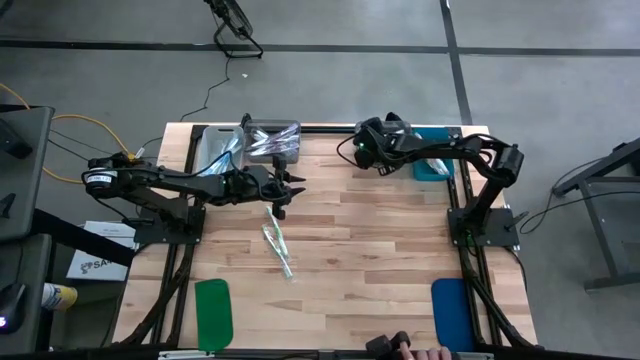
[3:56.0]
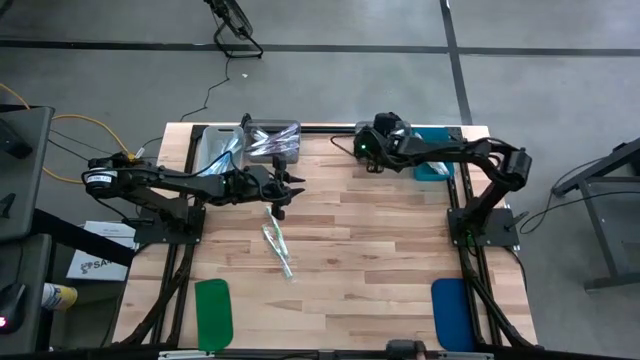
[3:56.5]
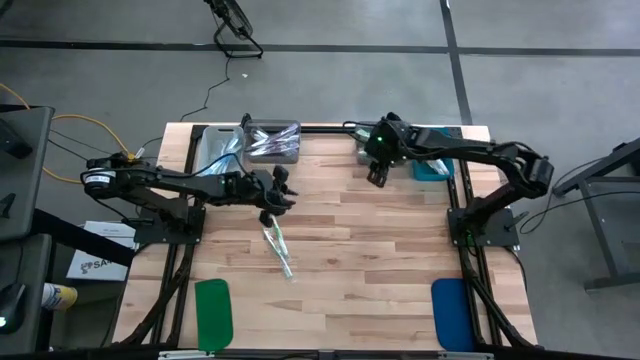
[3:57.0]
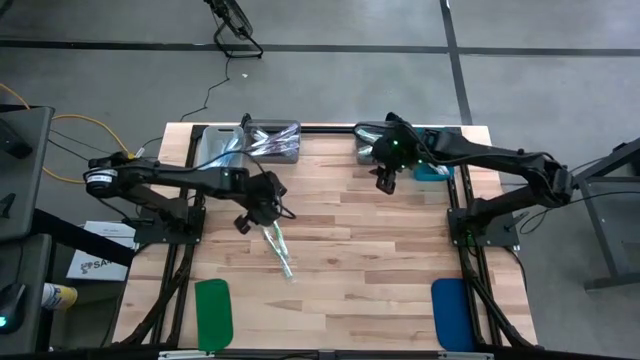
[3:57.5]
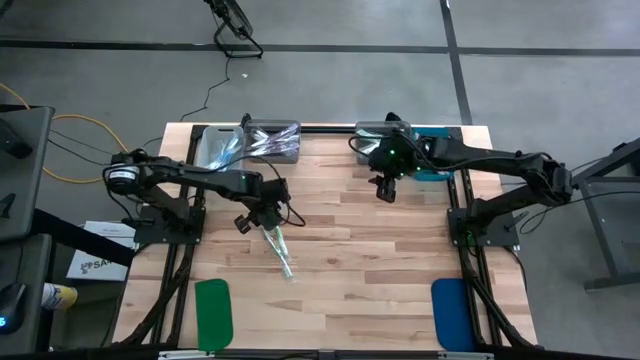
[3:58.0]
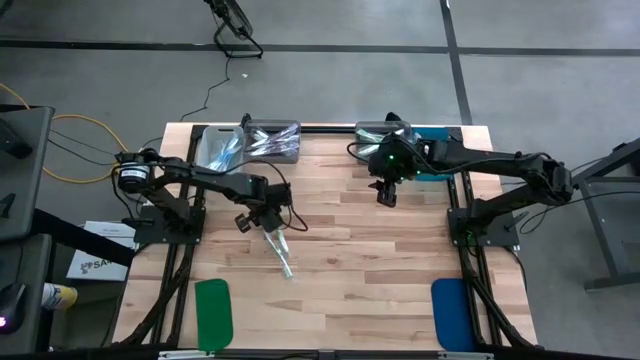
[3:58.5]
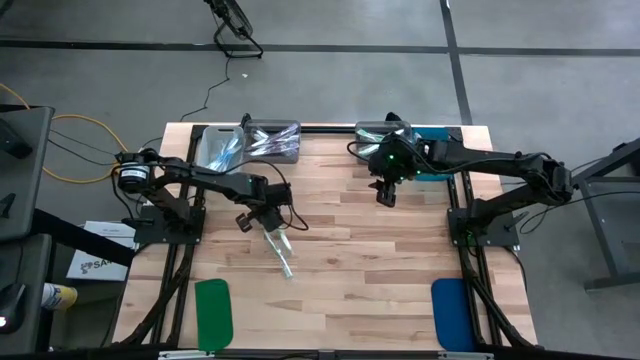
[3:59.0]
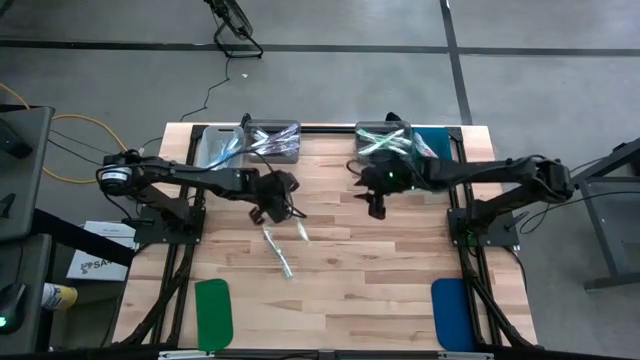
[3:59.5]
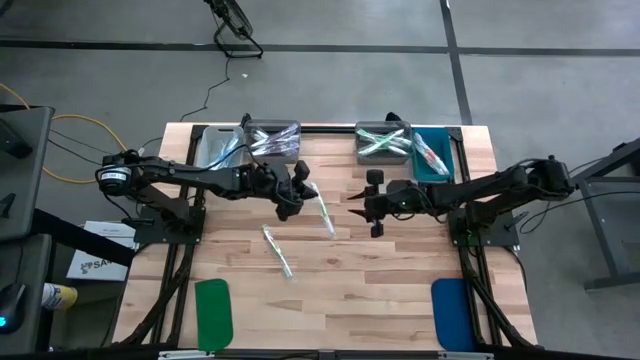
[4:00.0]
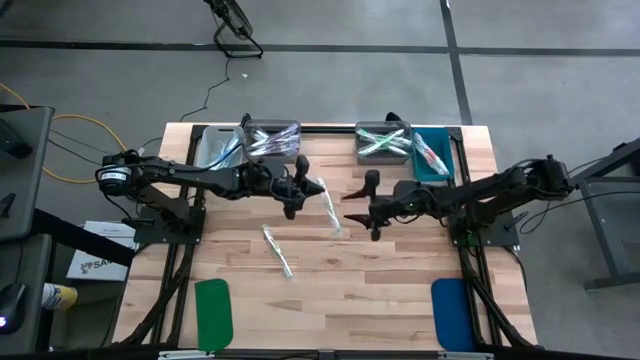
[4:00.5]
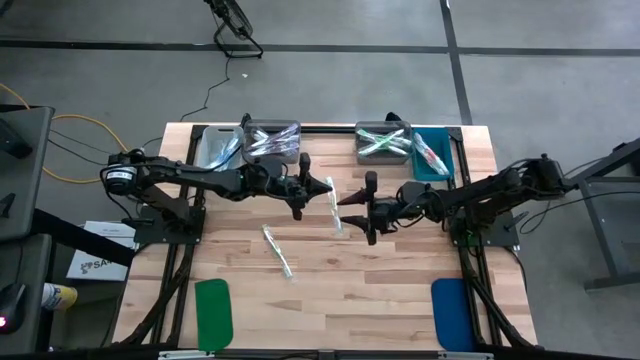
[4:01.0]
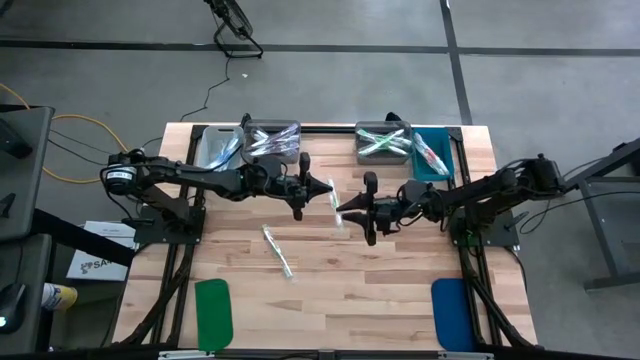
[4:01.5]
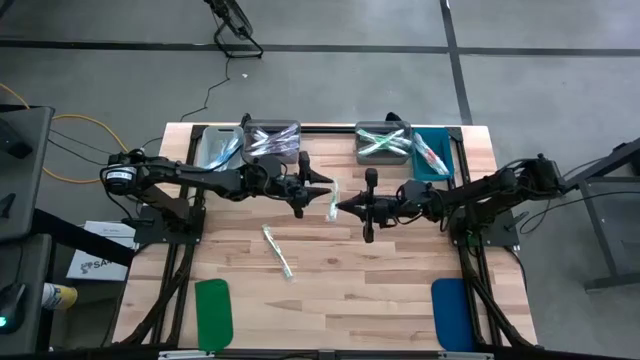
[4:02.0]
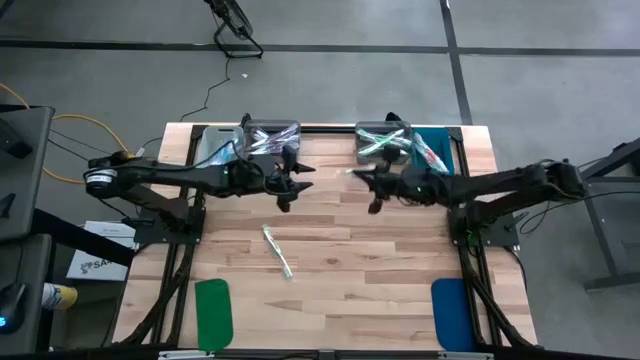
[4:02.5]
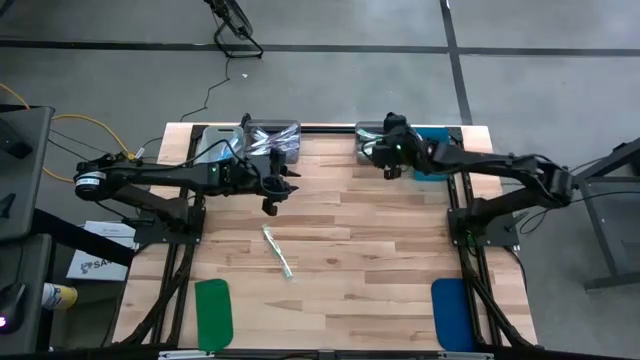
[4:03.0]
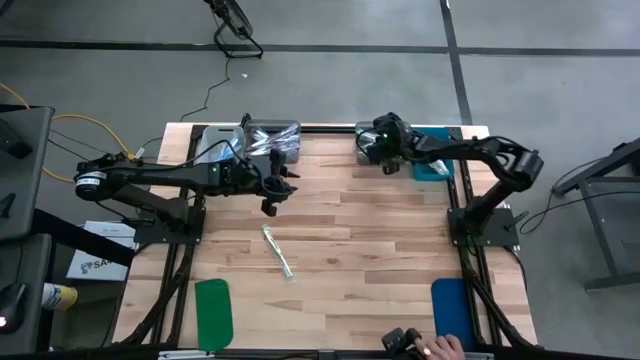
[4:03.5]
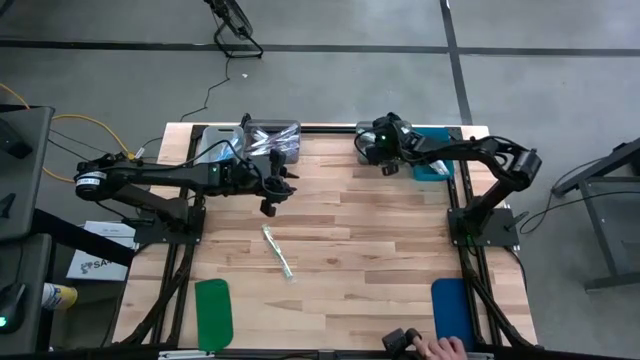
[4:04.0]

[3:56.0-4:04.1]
Task: Pick & Place Toothbrushes
Put the green toothbrush into the right black bin

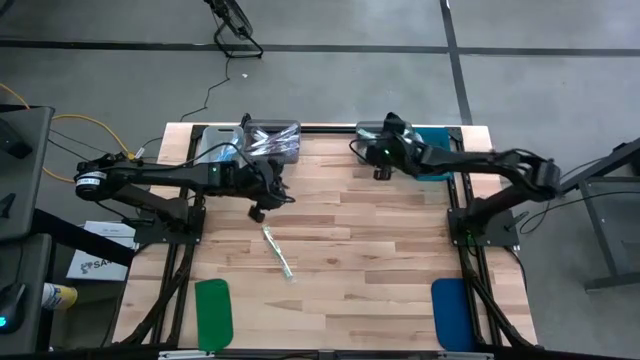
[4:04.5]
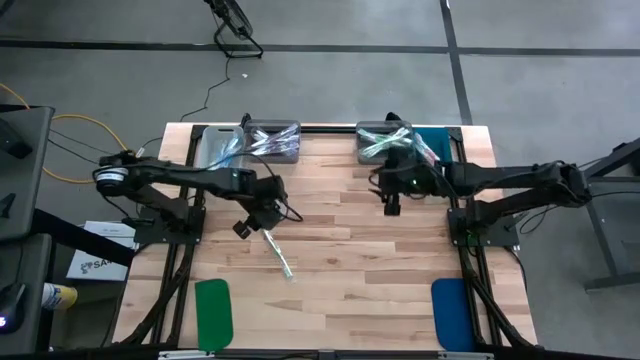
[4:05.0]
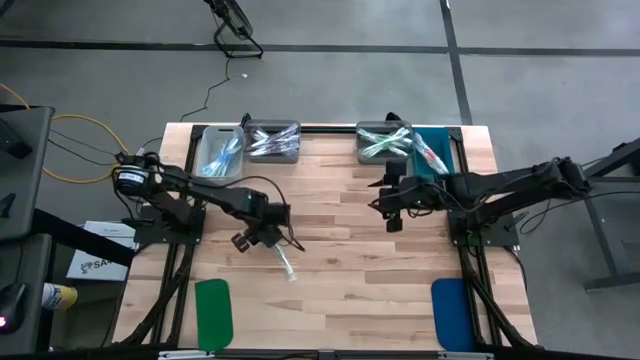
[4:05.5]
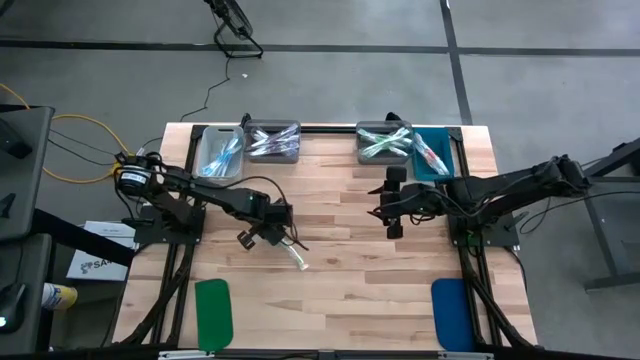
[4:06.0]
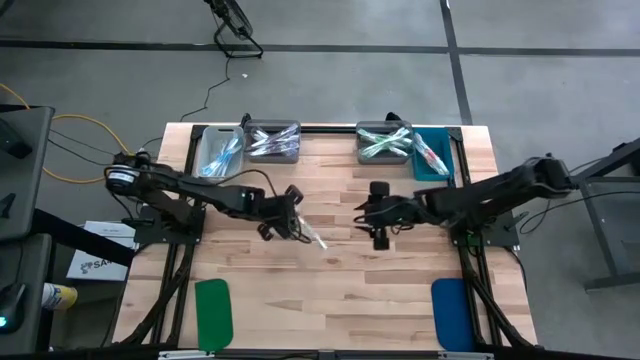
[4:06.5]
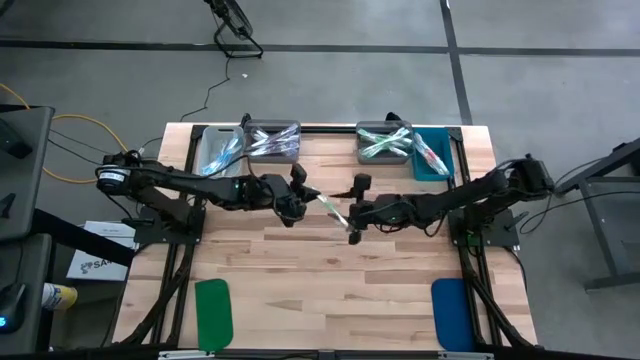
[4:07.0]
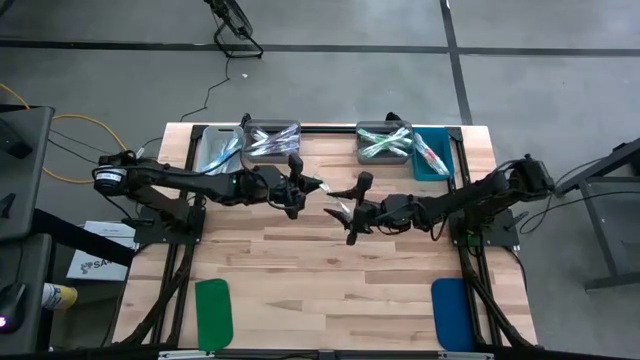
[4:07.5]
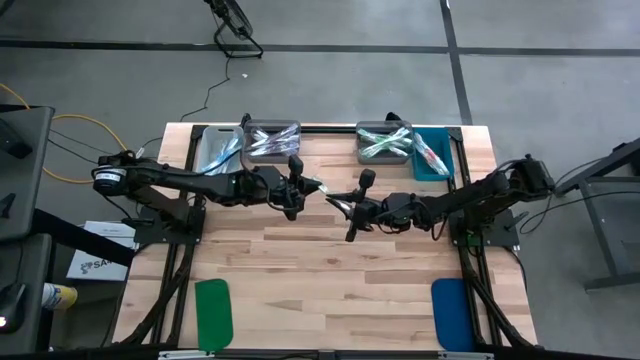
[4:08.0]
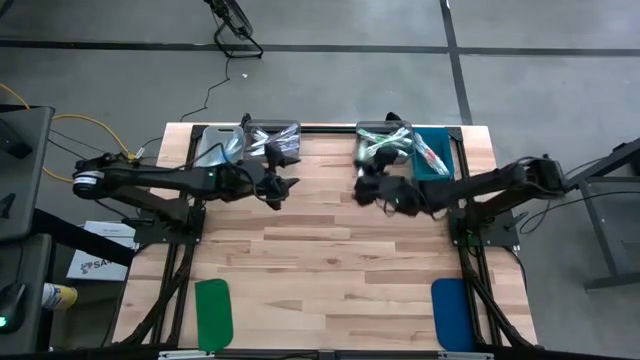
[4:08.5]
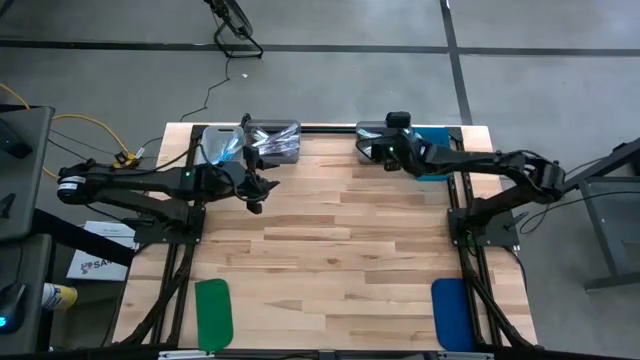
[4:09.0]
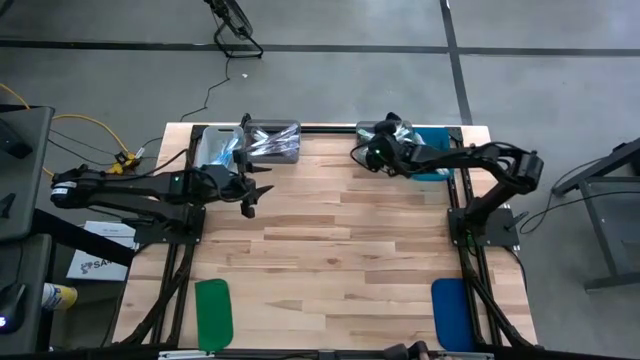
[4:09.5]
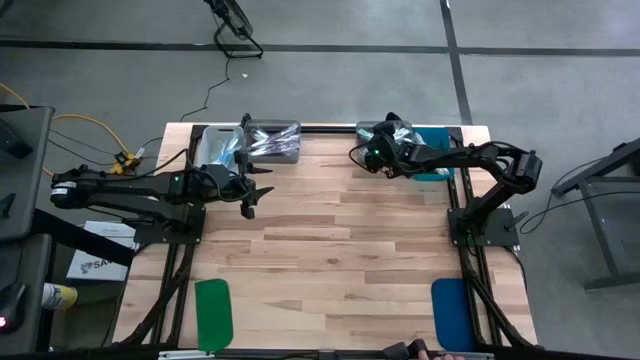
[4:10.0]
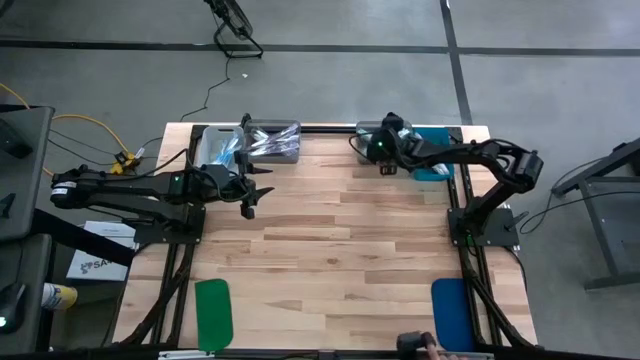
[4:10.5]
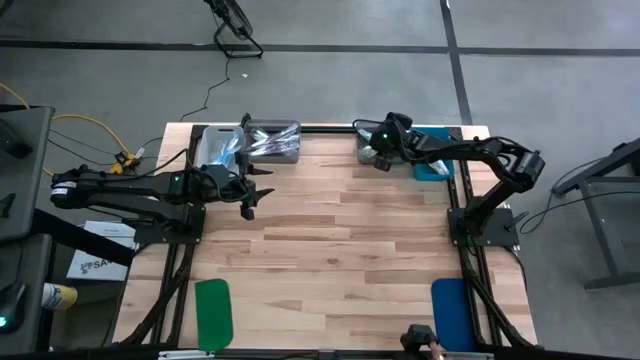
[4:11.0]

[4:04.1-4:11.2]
Put the green toothbrush into the right black bin

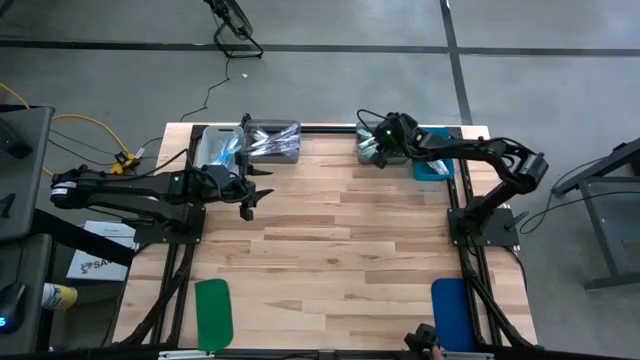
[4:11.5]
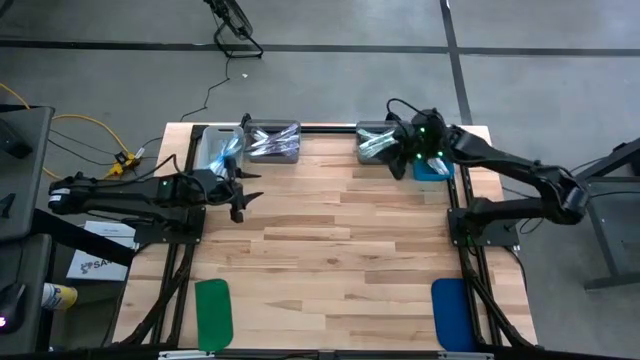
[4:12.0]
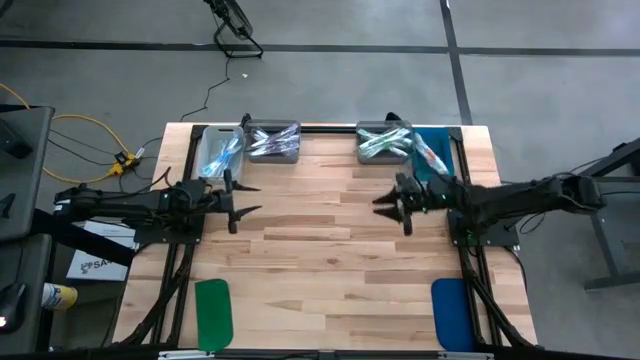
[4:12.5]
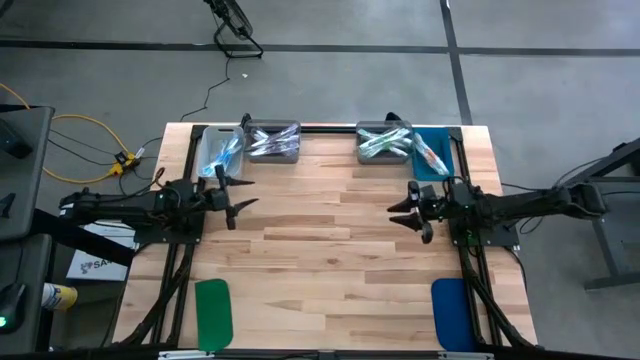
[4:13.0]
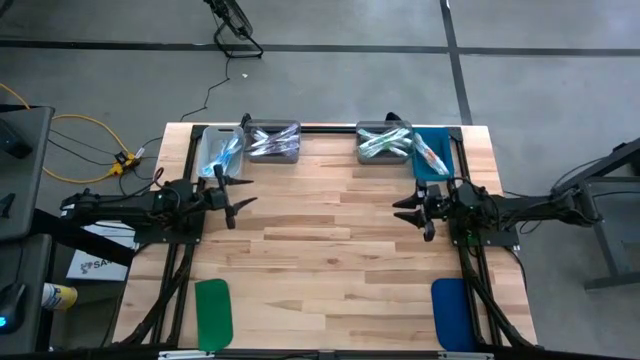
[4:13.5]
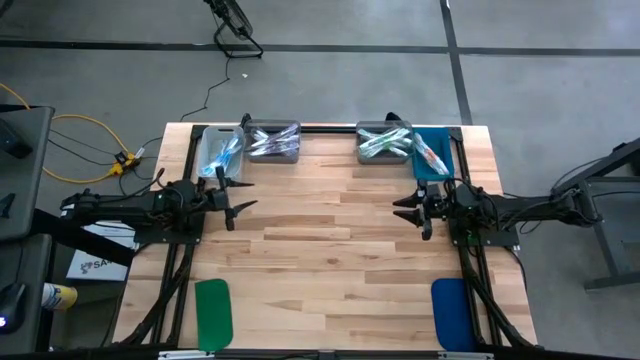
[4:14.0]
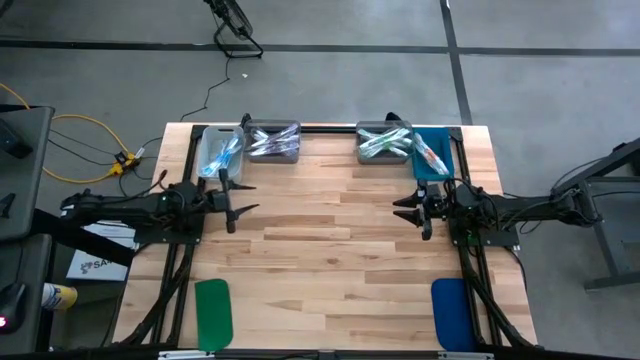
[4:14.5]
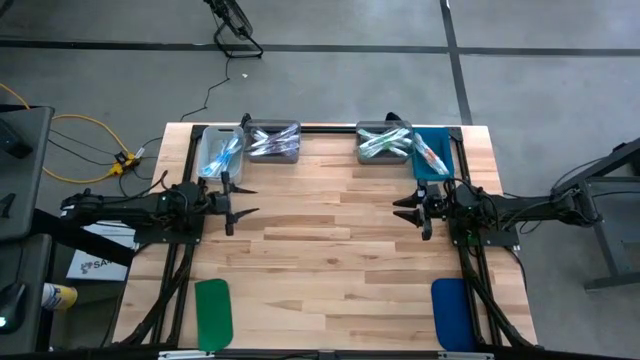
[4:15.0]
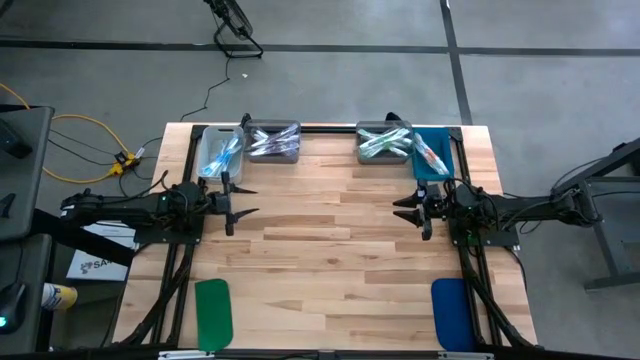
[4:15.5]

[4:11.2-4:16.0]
Return to Home Position

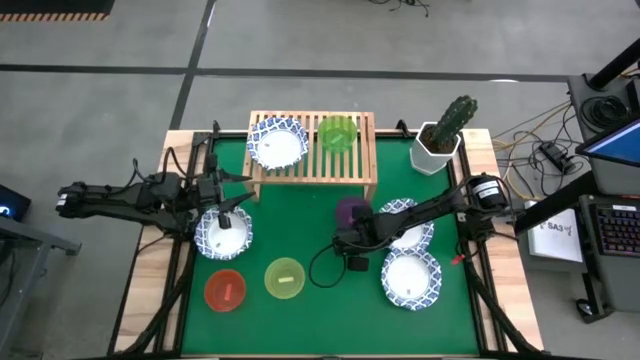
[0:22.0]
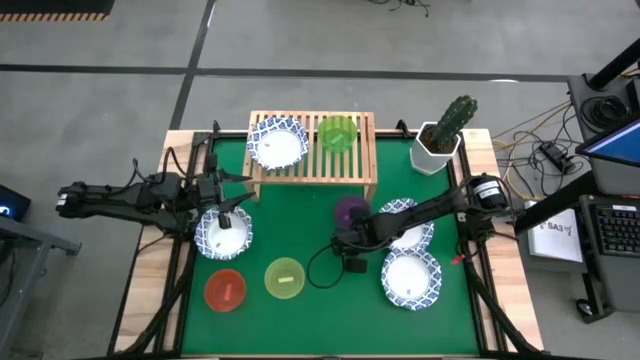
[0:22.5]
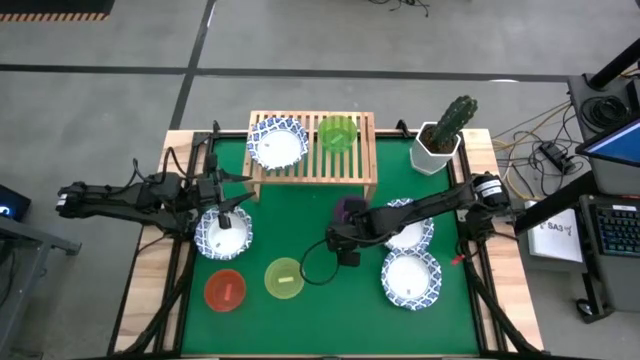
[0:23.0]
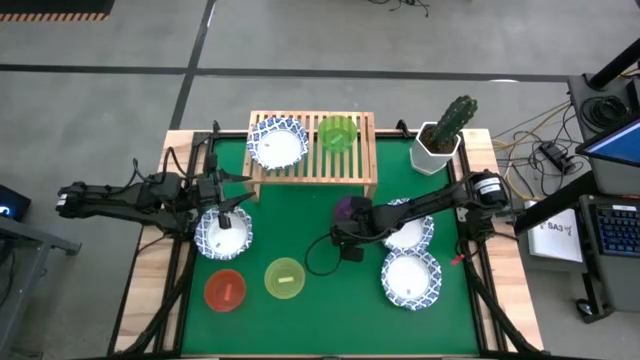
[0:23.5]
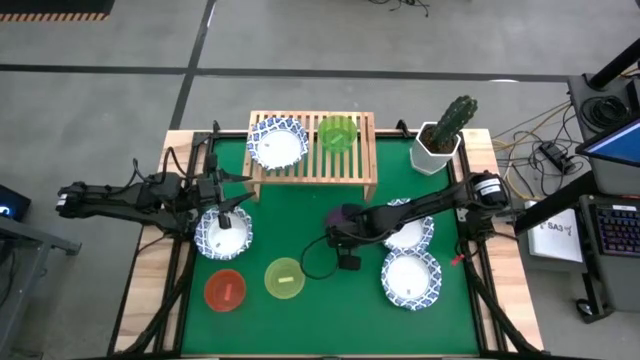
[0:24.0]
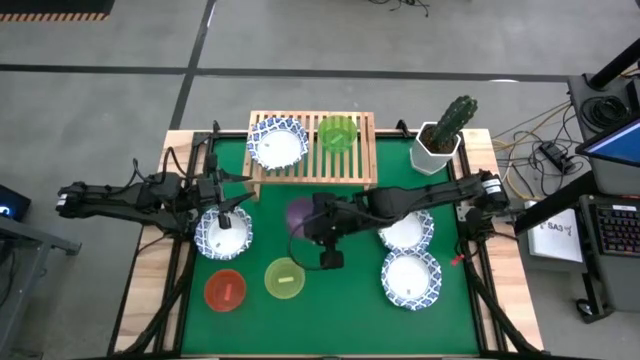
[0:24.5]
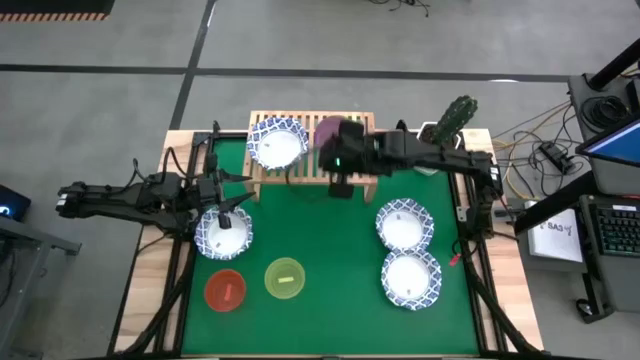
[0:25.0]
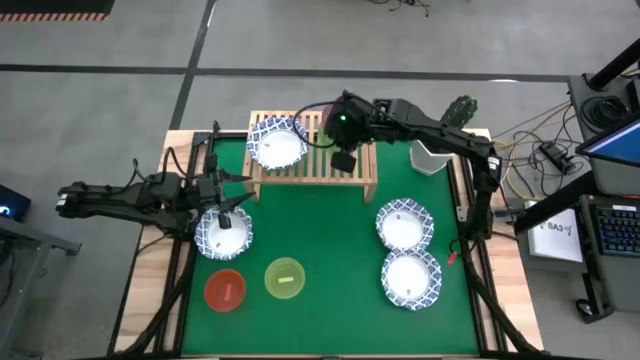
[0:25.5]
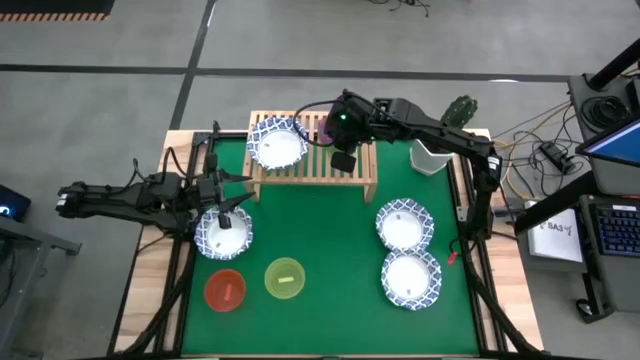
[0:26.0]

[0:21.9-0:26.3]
Task: Place and stack bowls onto a shelf
Stack the purple bowl on top of the green bowl on the shelf
